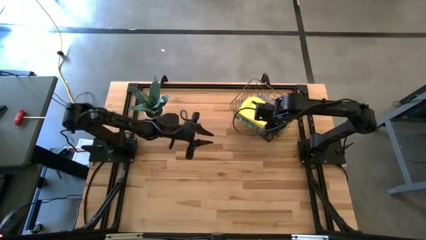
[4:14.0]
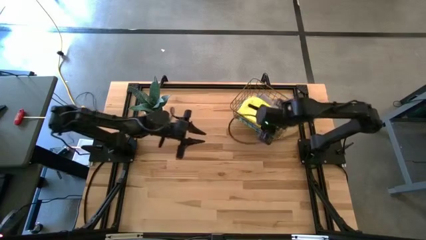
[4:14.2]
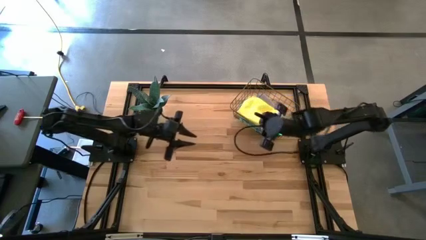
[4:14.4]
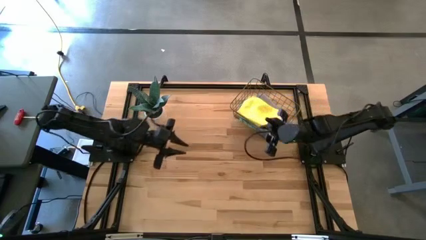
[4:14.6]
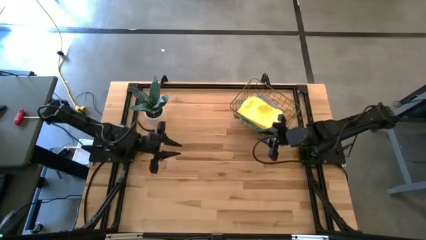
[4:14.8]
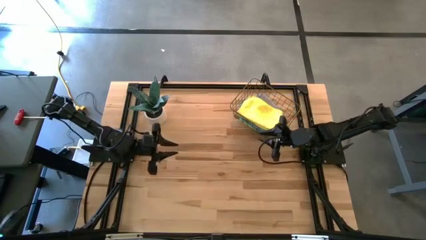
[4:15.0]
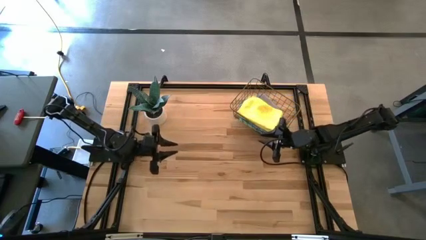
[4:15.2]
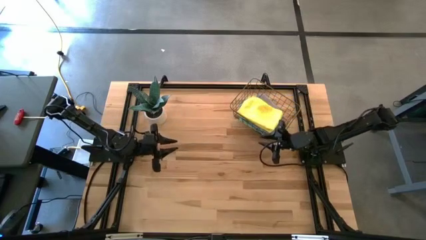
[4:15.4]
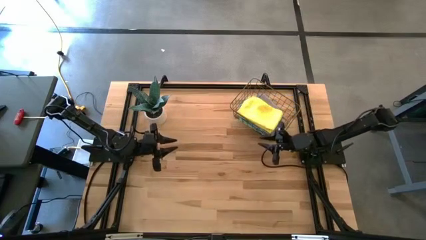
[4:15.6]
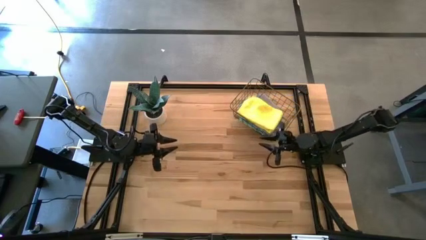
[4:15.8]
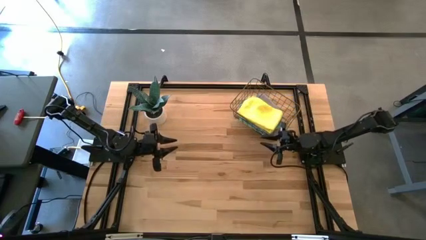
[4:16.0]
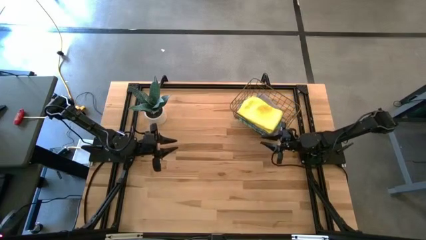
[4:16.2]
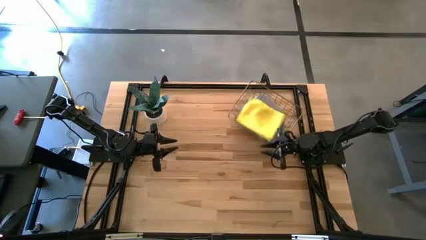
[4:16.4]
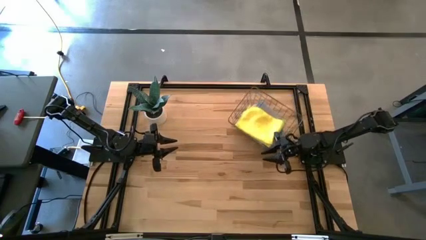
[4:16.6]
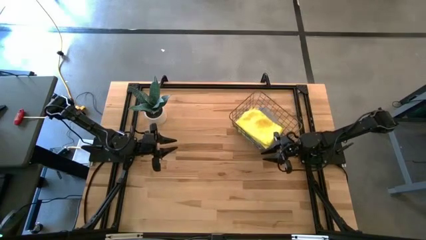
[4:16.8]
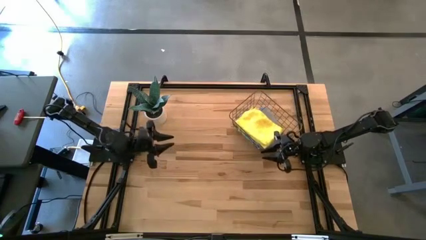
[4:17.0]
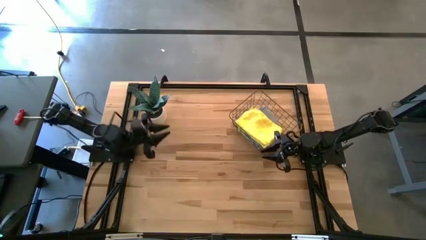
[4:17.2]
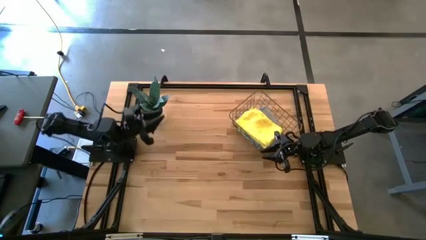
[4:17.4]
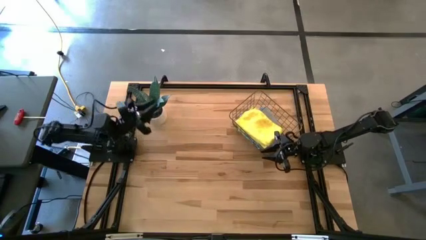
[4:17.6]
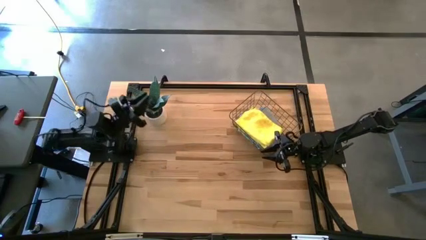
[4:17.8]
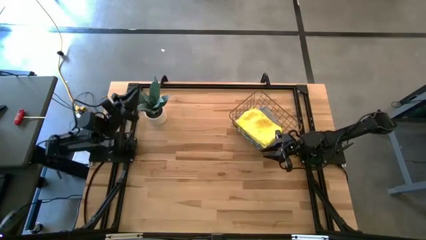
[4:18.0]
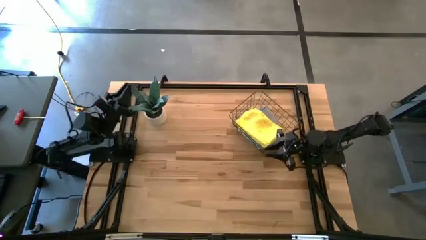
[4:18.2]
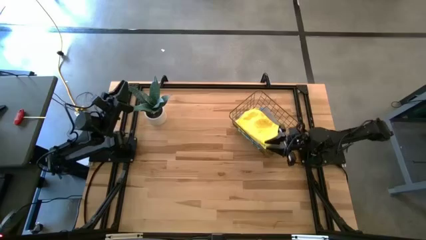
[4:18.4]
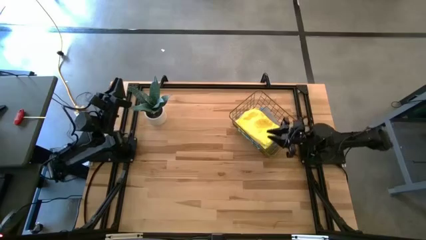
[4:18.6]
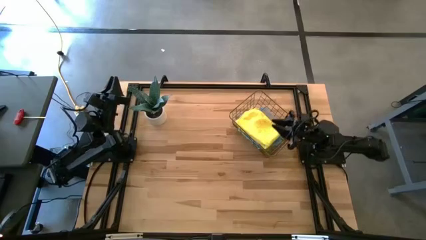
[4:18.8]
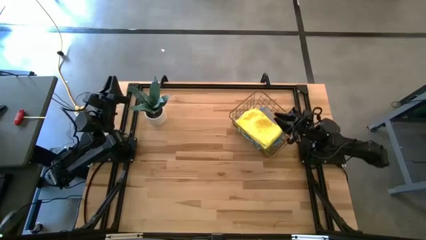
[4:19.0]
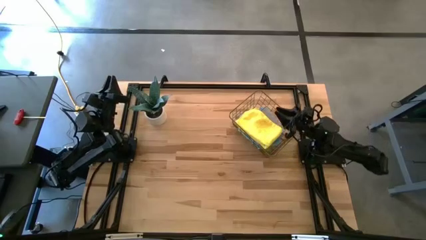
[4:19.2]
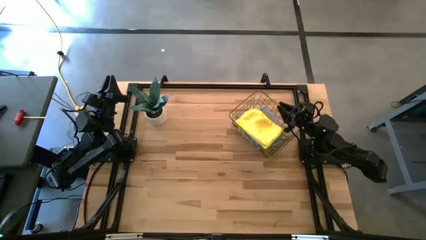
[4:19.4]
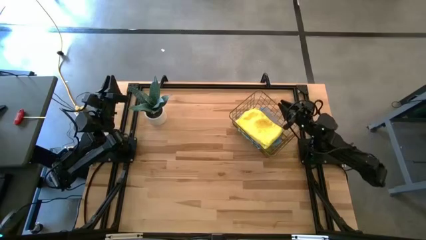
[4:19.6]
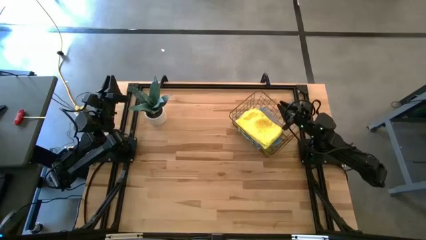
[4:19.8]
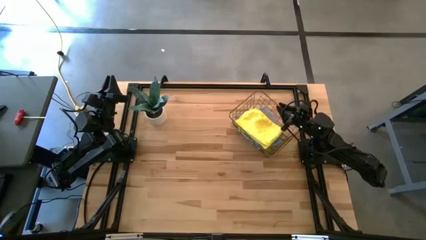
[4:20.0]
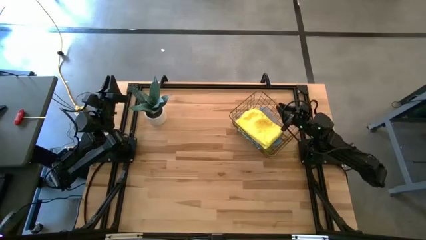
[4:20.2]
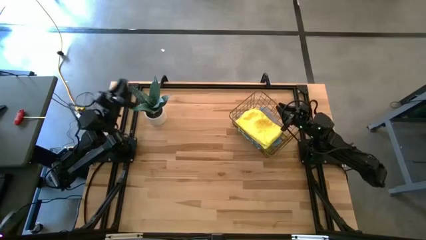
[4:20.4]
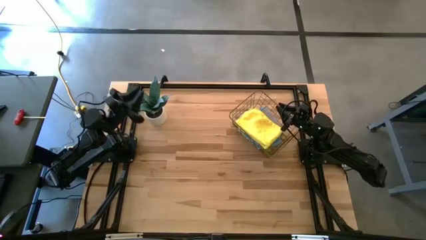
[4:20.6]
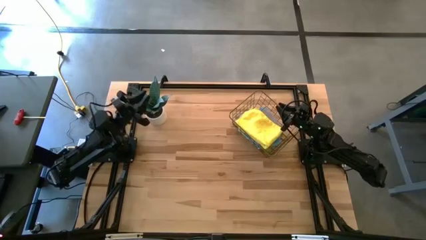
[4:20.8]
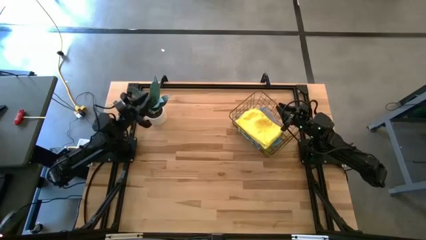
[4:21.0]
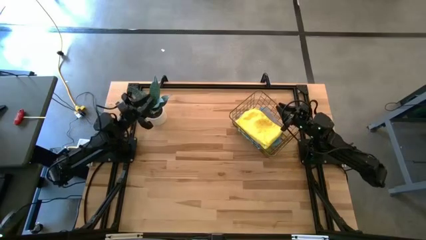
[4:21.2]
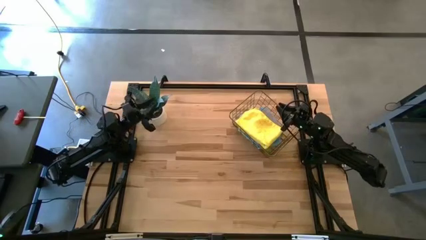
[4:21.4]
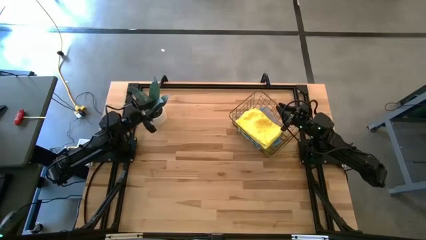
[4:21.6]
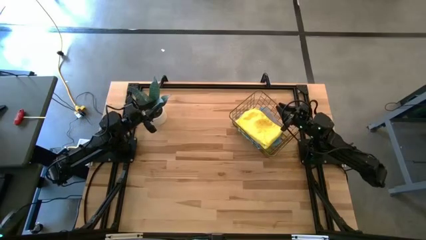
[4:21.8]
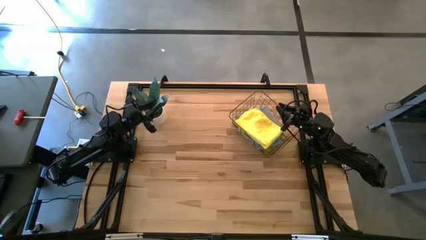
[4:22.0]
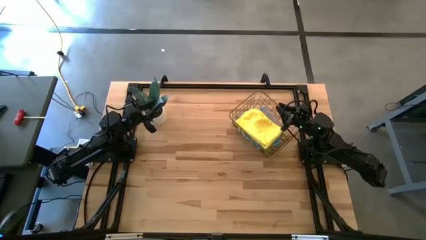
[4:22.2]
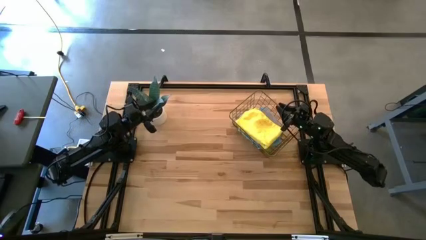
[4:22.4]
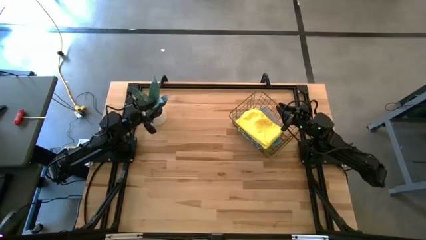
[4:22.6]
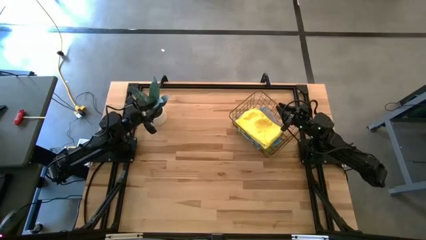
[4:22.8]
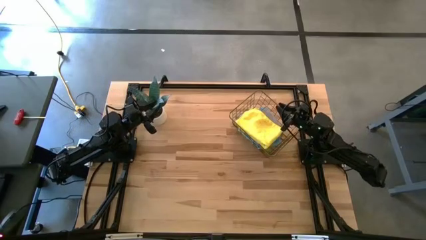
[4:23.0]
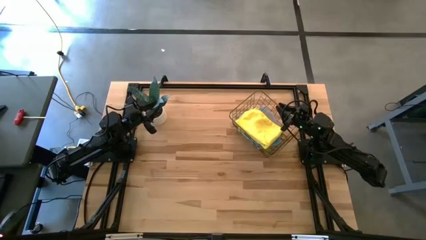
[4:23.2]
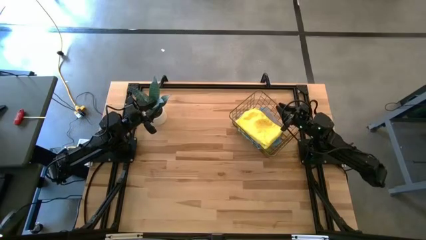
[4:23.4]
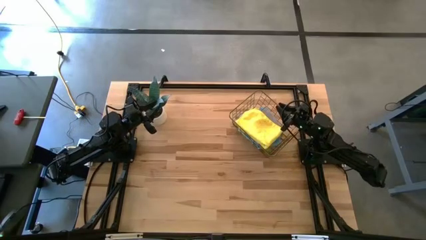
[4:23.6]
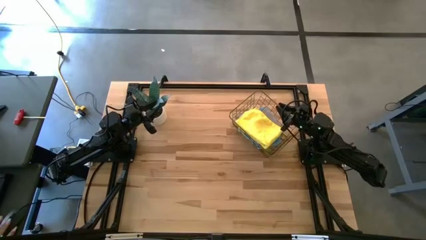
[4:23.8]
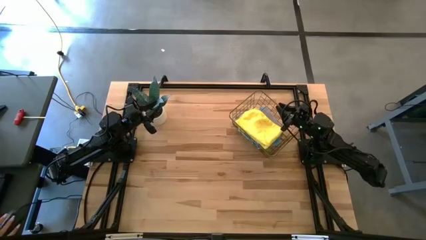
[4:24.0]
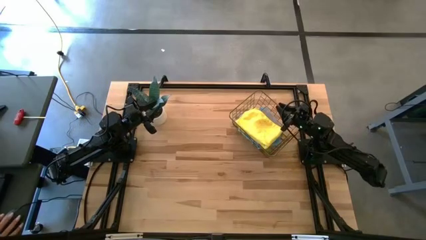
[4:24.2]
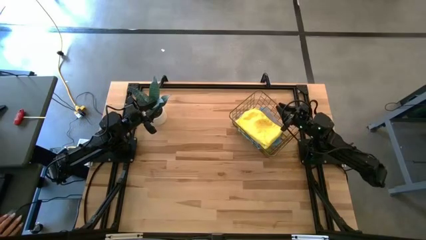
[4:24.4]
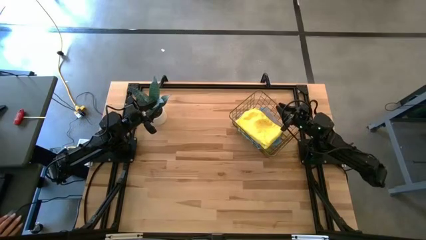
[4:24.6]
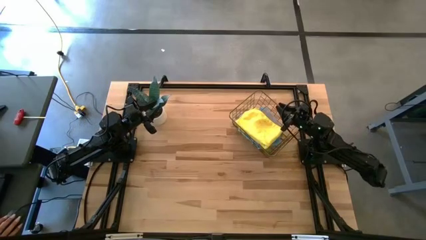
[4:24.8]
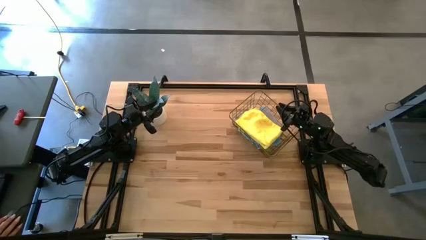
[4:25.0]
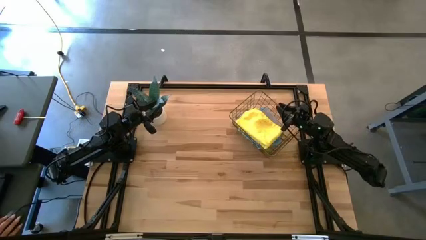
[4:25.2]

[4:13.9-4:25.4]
Task: Fold microfiber towels
Return to Home Position
